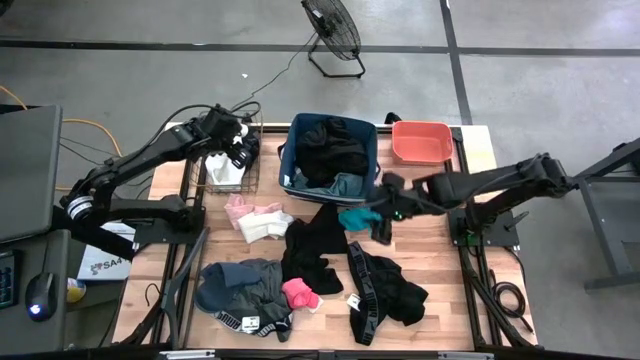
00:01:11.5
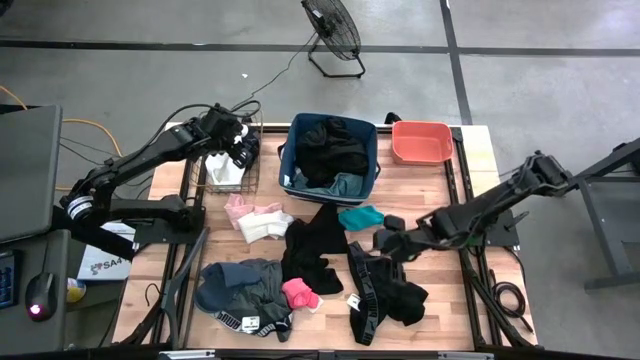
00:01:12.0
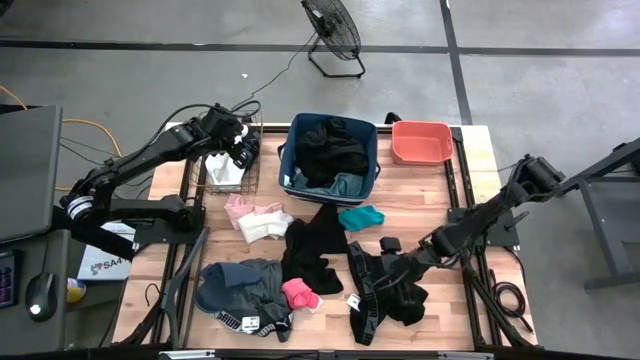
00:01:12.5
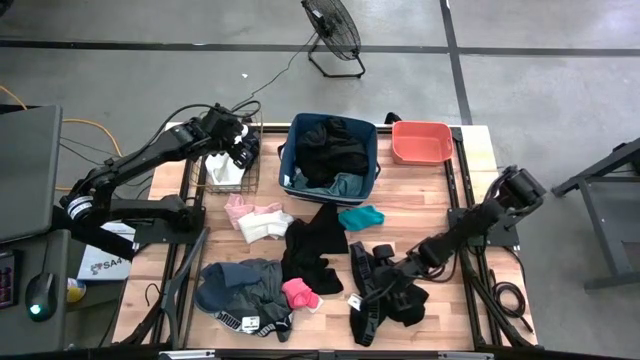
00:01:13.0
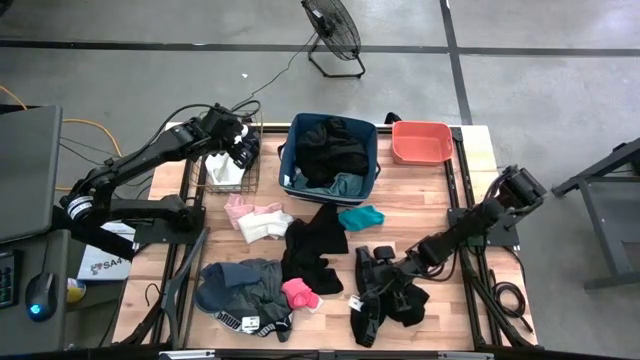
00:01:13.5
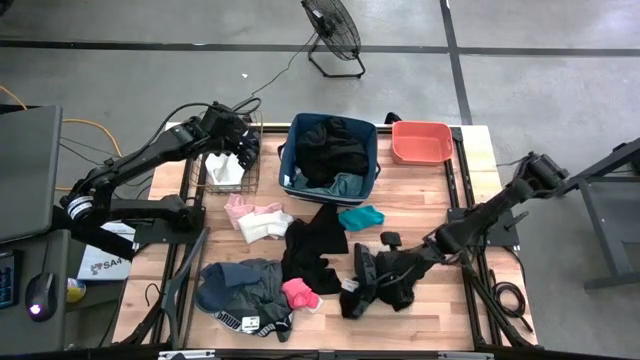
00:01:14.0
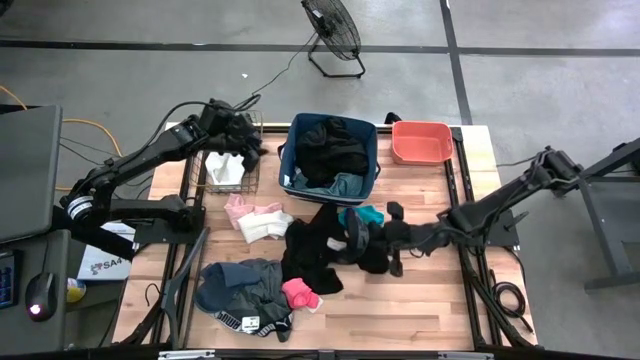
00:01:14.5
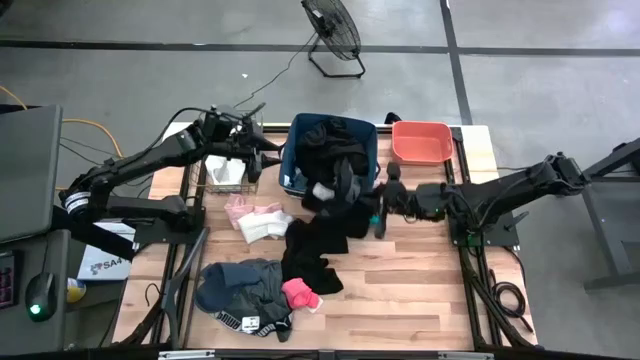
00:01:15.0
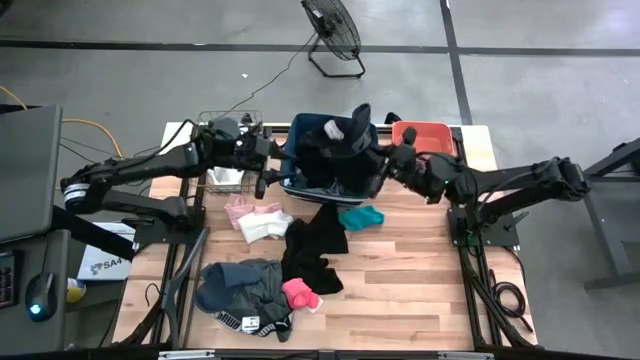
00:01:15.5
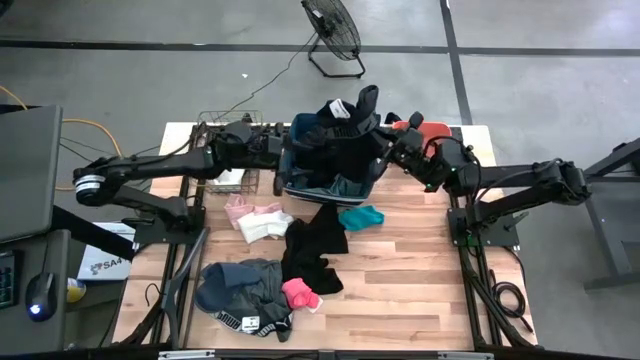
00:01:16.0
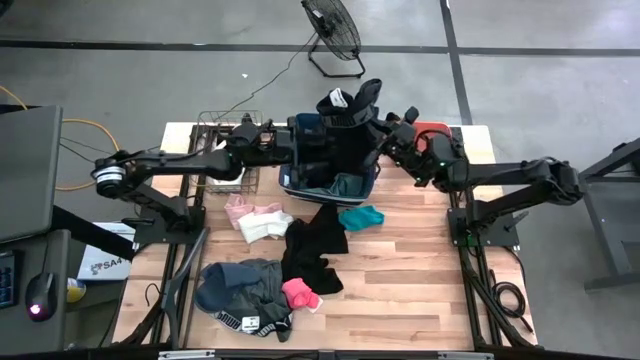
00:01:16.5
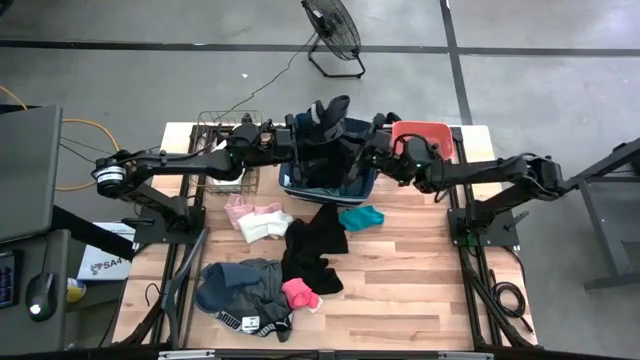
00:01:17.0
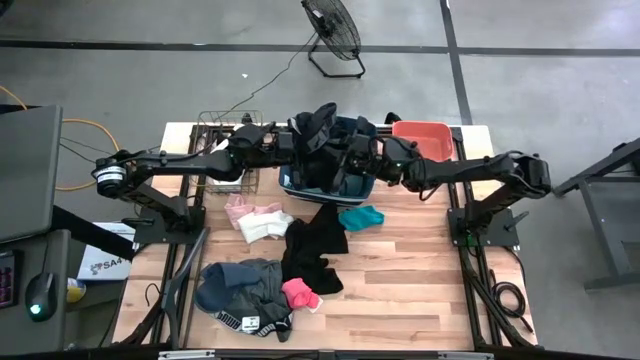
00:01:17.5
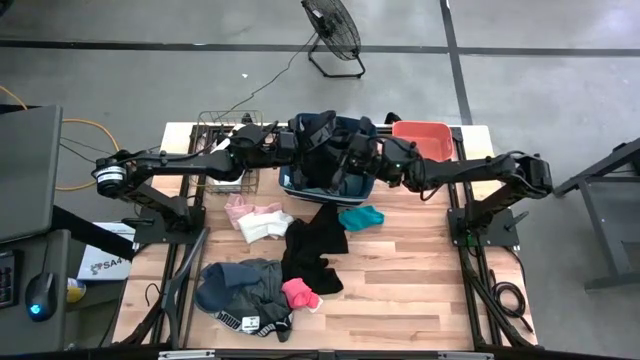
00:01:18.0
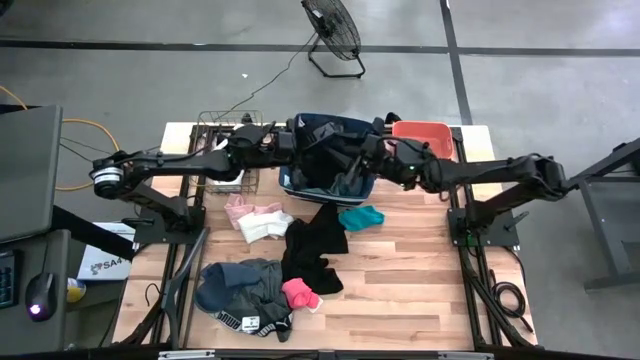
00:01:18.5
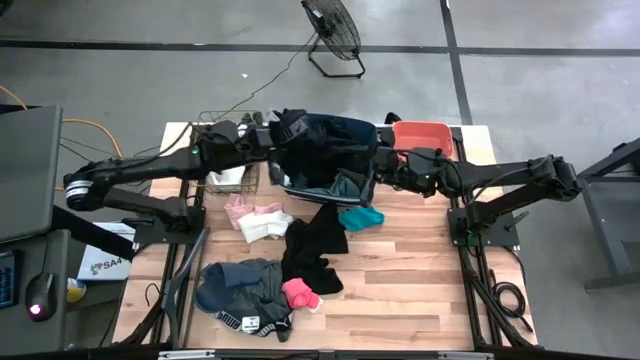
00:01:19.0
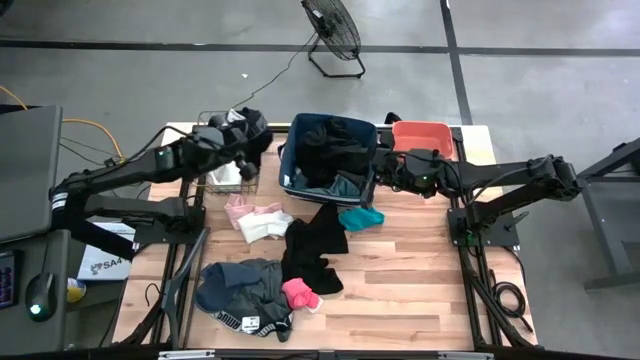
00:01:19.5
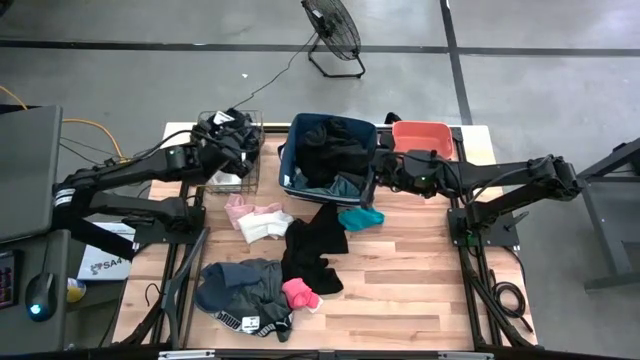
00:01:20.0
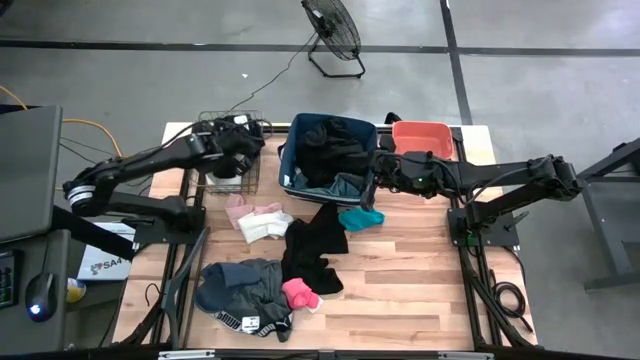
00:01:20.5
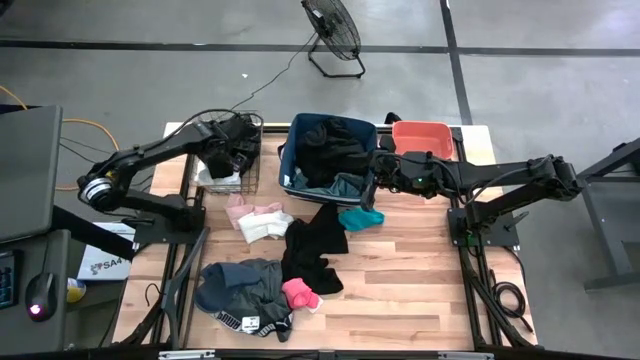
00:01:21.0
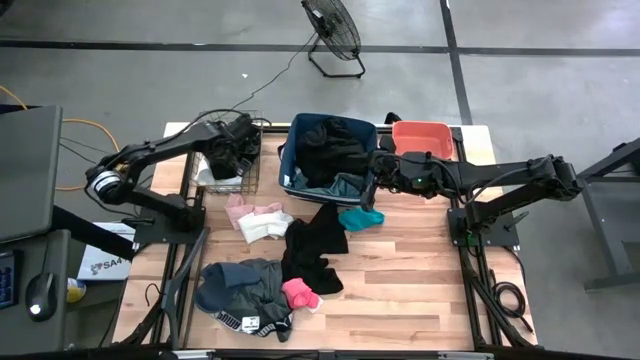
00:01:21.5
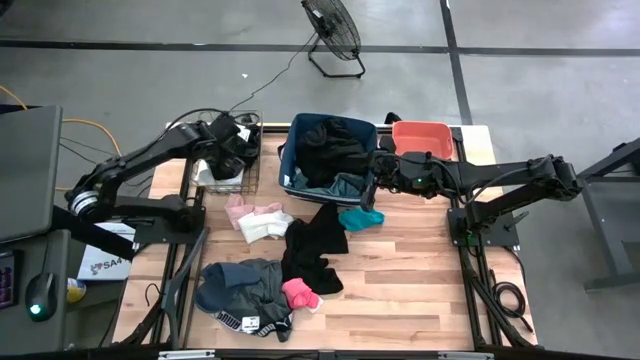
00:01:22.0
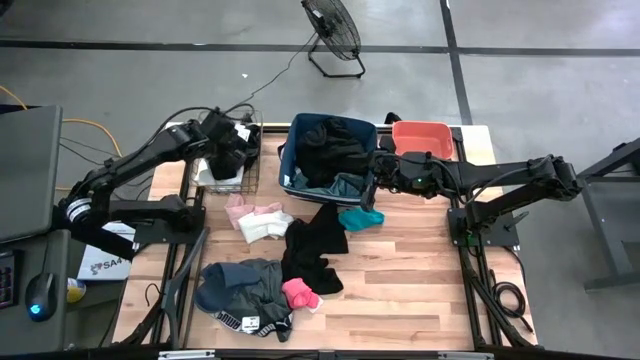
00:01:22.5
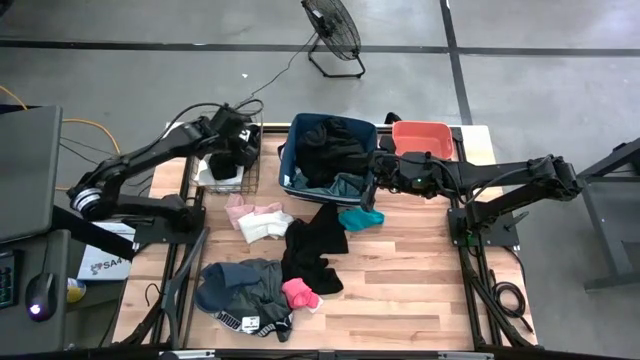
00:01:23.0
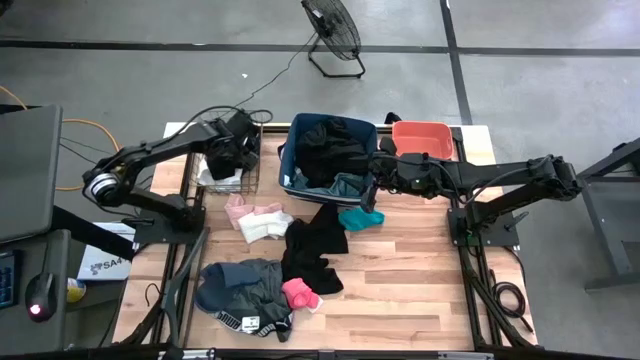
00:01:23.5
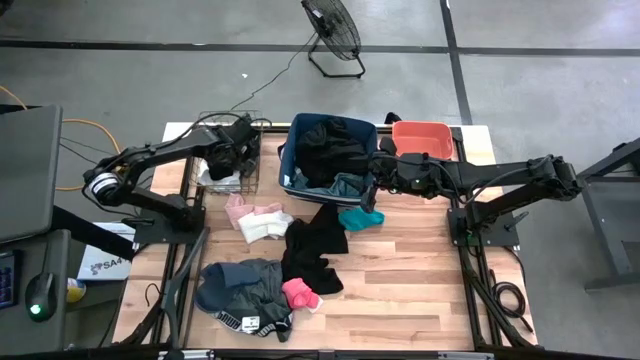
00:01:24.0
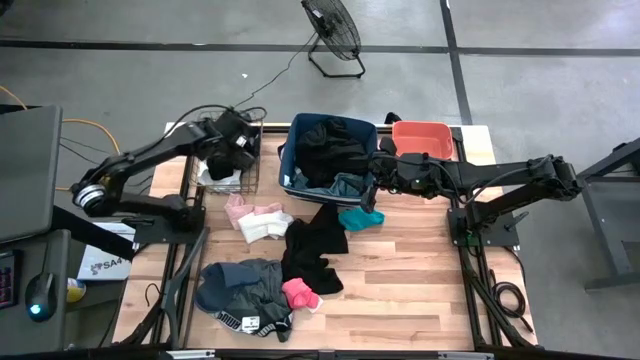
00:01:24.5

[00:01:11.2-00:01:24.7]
Task: Pick & Place Cloths
Put the right black underwear into the wire basket

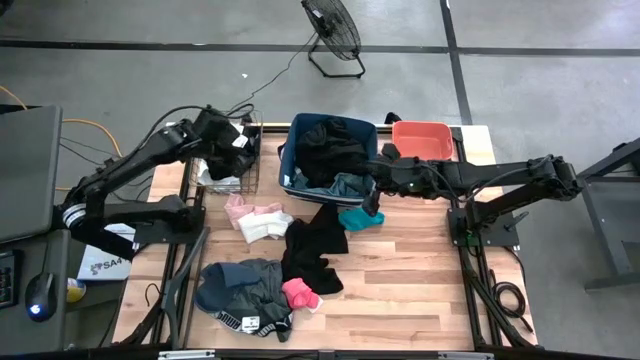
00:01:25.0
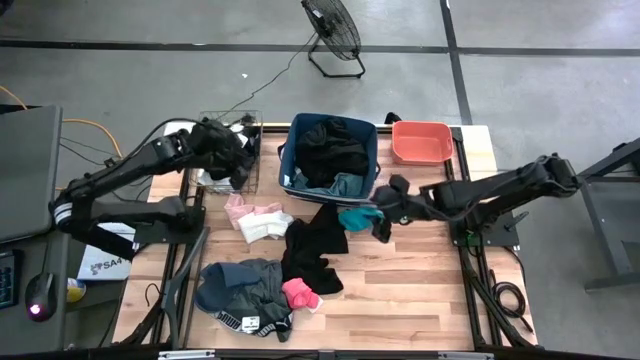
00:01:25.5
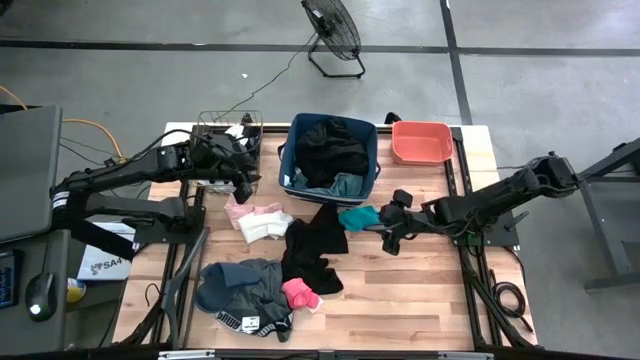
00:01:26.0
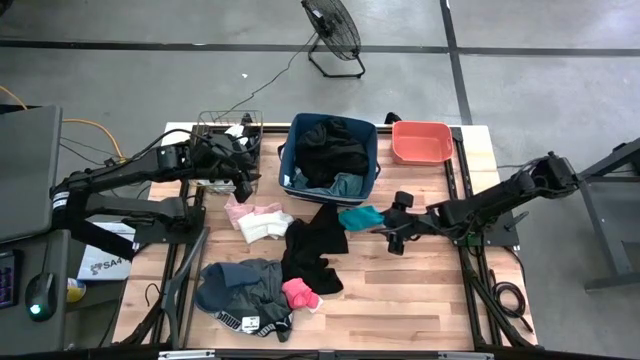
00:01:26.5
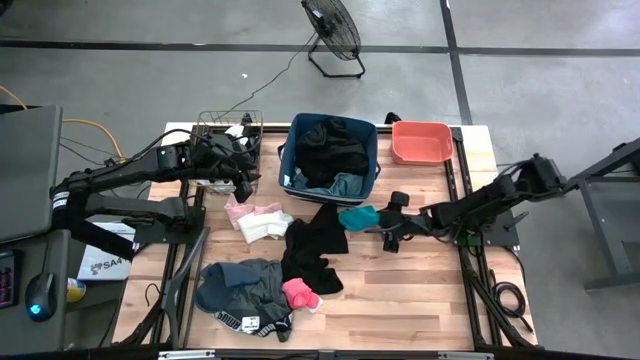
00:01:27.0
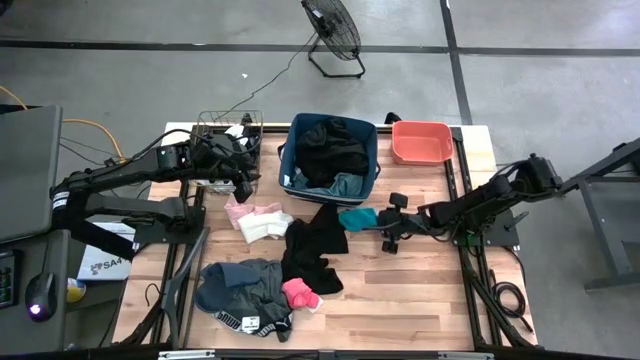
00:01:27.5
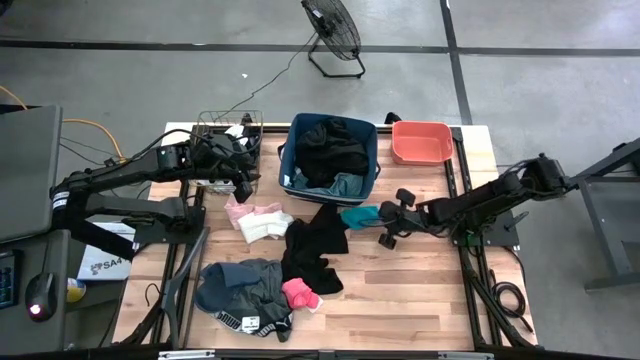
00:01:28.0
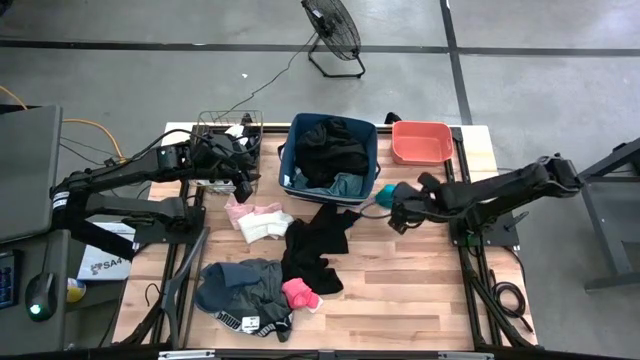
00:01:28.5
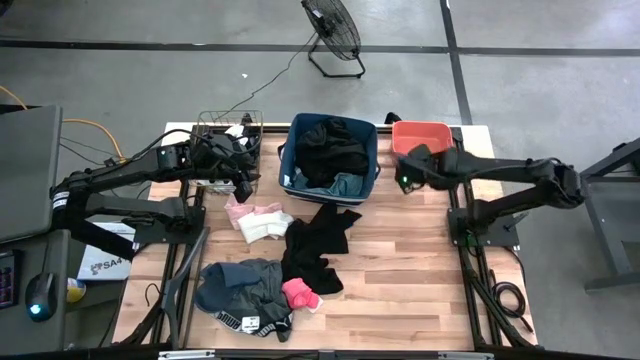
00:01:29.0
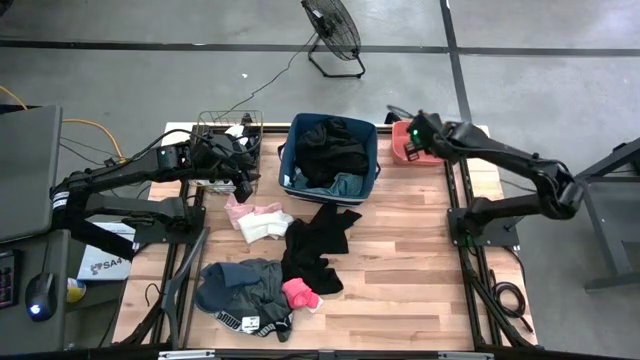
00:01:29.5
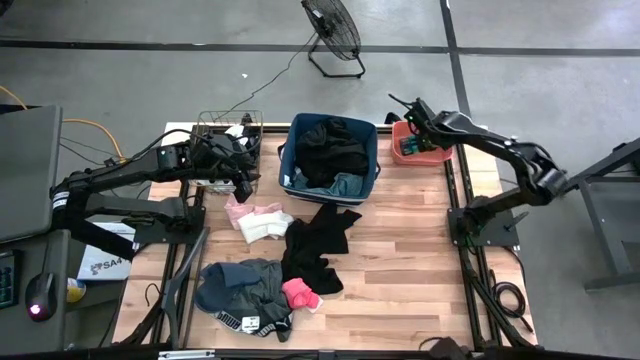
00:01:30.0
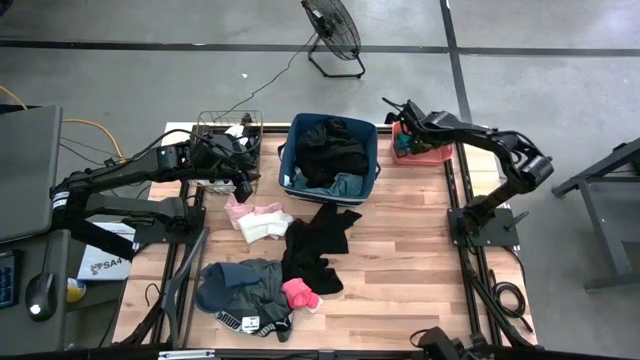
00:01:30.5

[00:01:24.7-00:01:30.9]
Put the blue sock into the orange bin

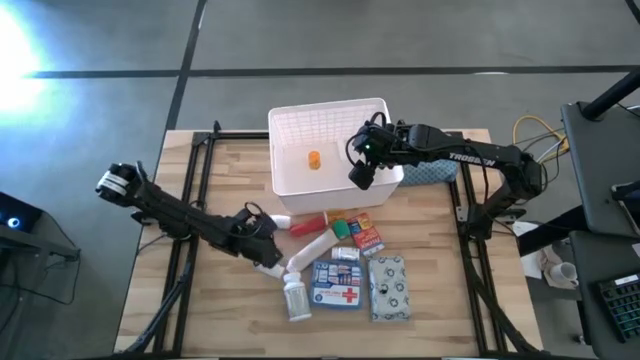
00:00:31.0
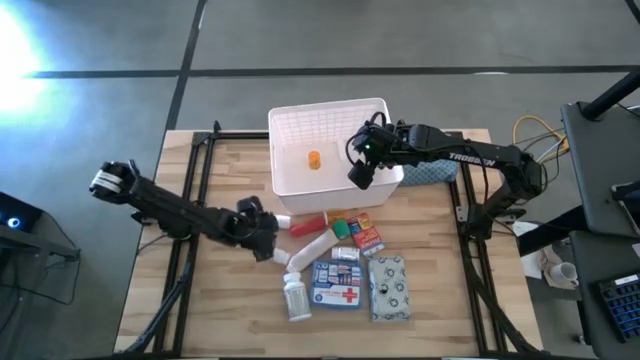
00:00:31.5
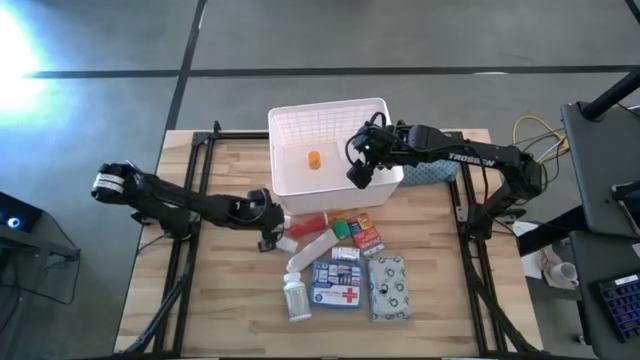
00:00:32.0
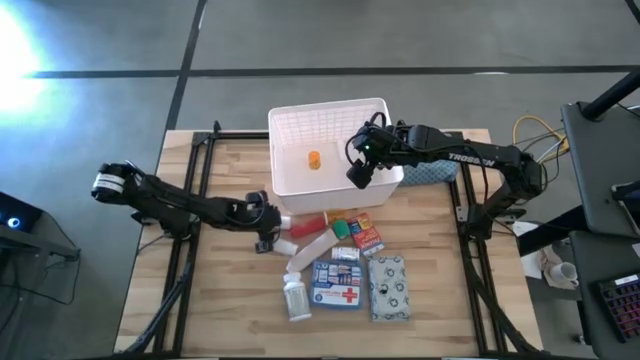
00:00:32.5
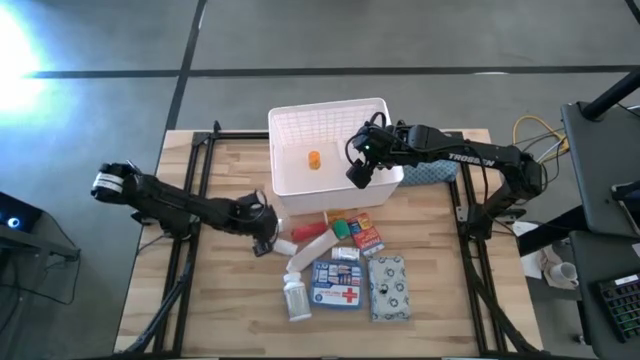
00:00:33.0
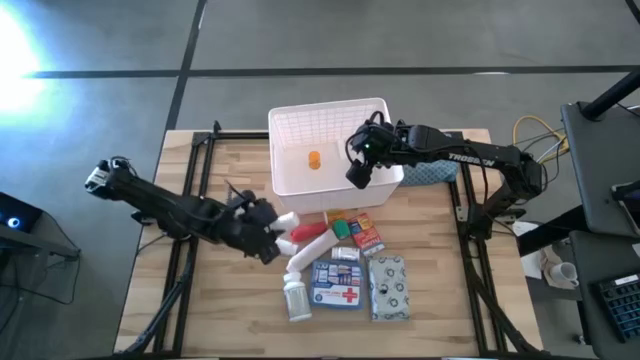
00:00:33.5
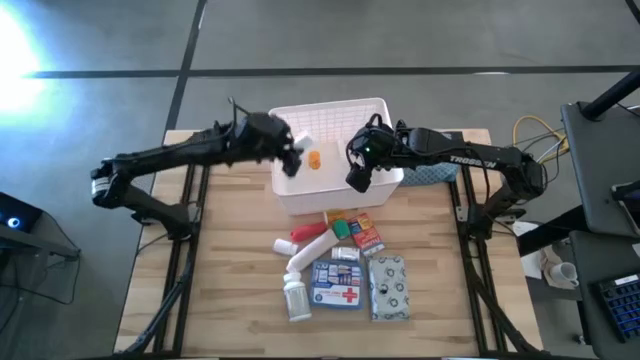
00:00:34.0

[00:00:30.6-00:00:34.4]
Task: Pick & place medical supplies in basket/bin
Put the white pill bottle into the white container
